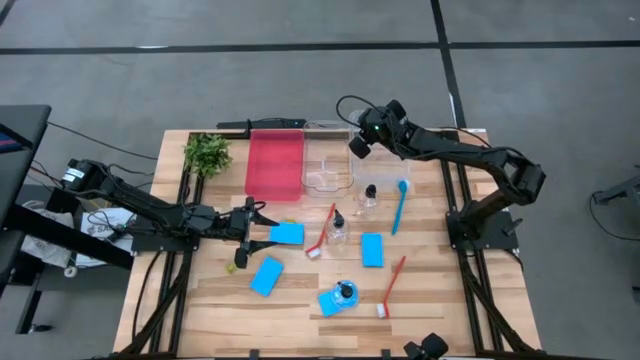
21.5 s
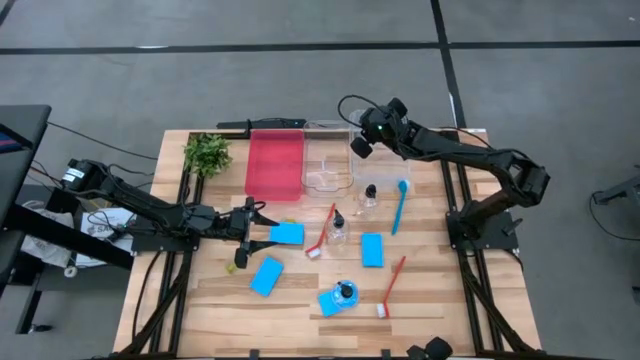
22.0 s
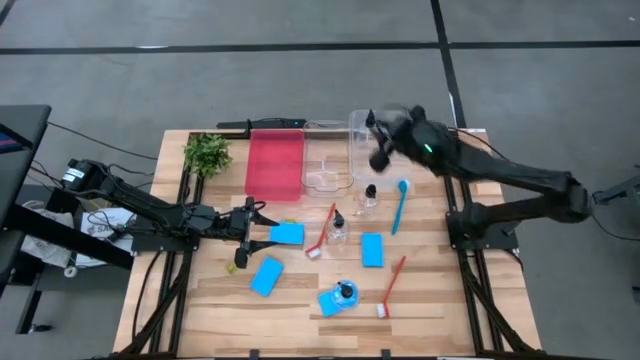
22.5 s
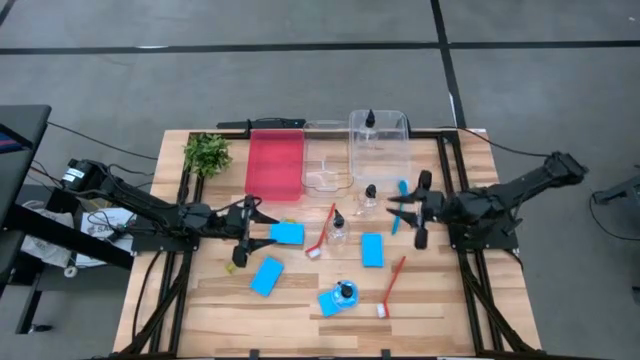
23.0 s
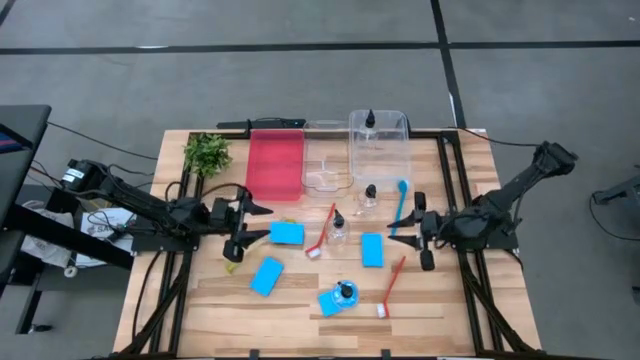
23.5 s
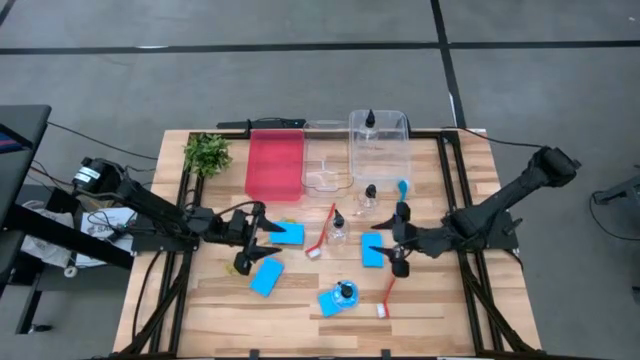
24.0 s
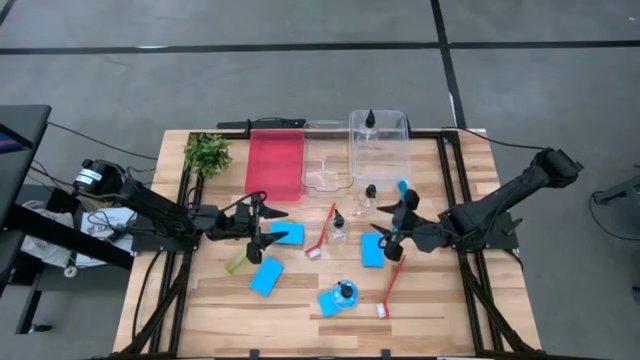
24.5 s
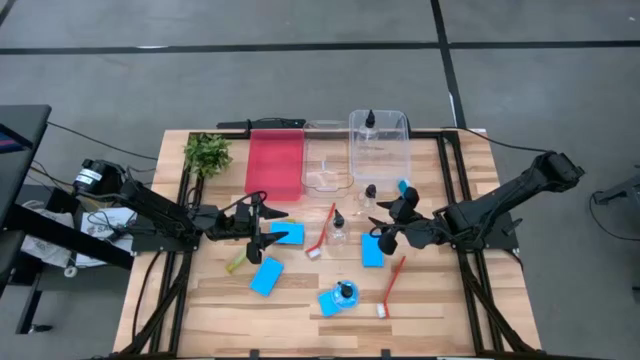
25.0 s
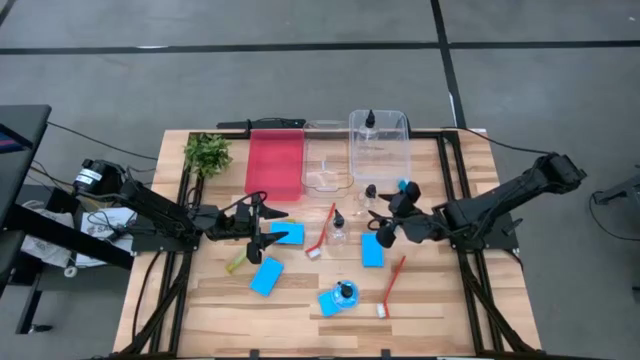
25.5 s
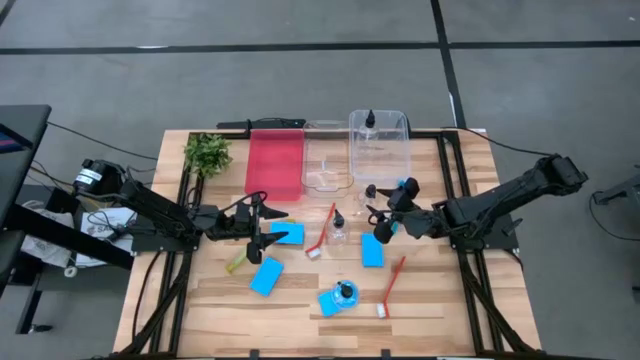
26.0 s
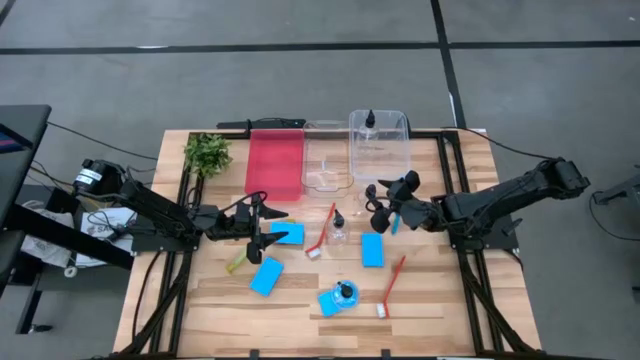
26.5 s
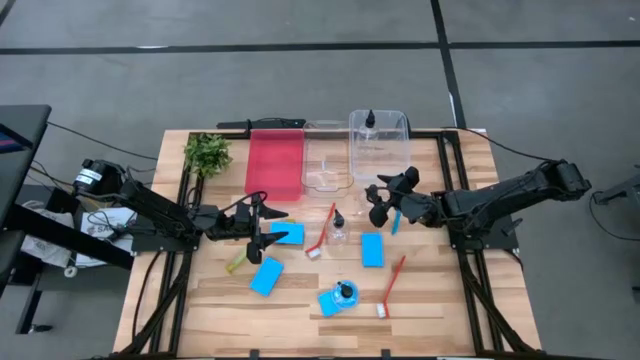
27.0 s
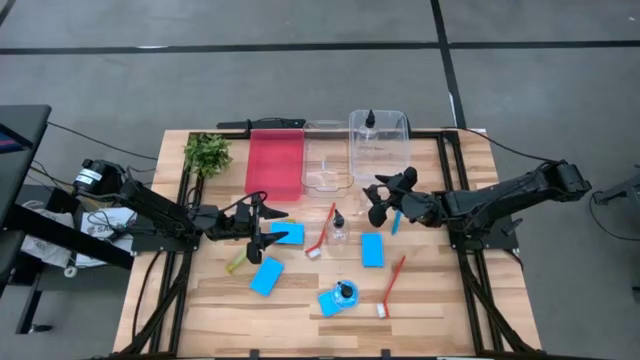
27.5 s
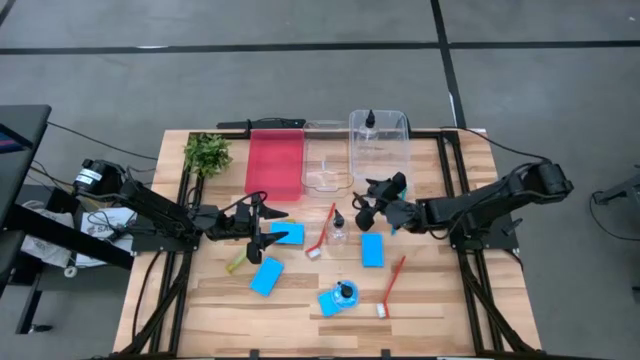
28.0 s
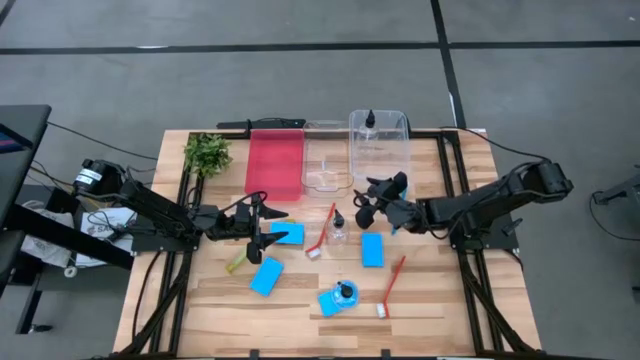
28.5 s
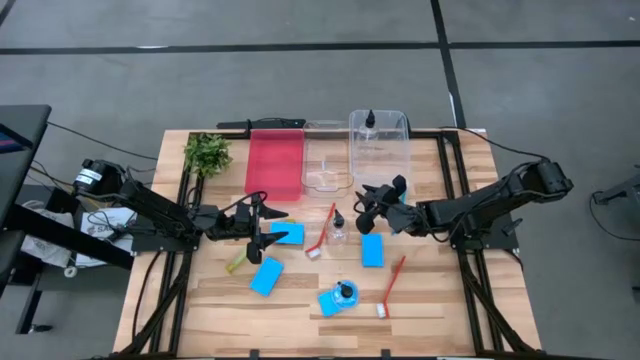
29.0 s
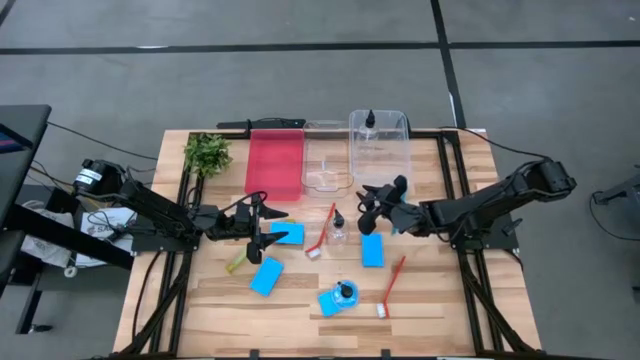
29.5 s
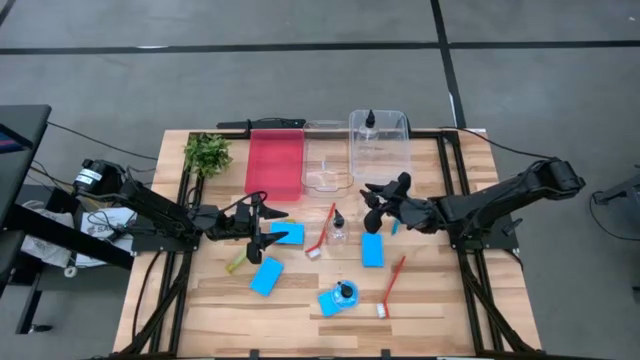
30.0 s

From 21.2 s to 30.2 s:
Task: Pick & Place Kitchen Sink Supplies
Put the top soap dispenser into the right transparent bin

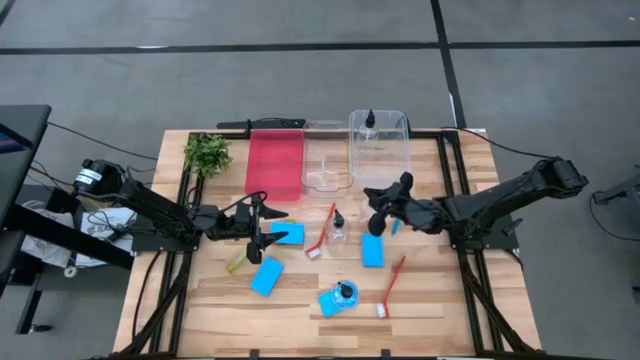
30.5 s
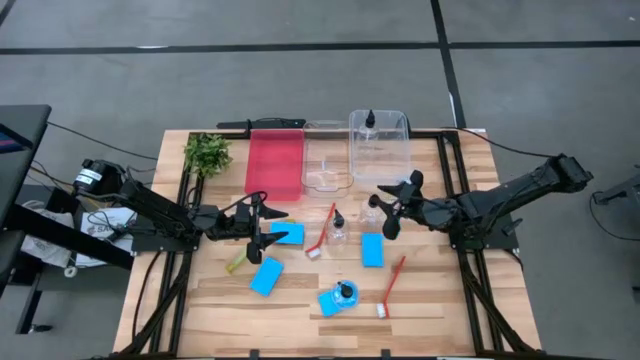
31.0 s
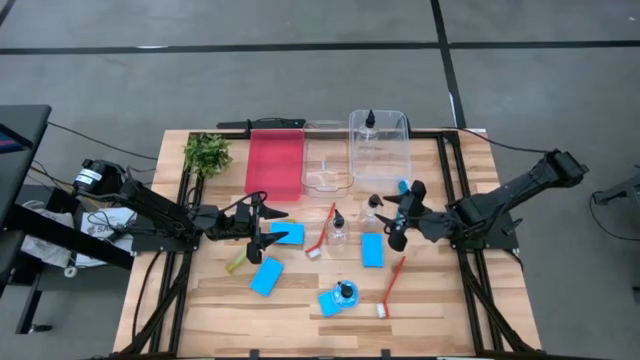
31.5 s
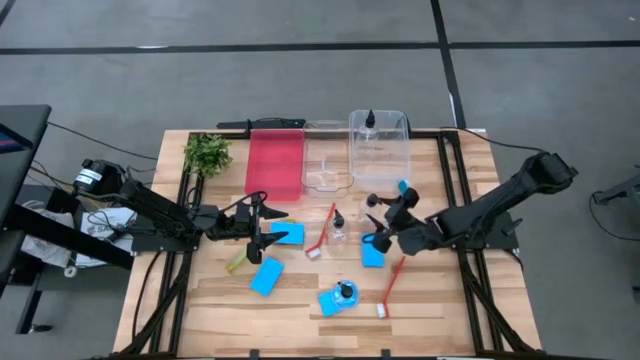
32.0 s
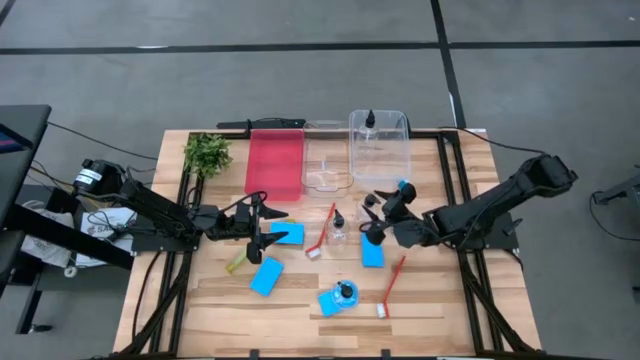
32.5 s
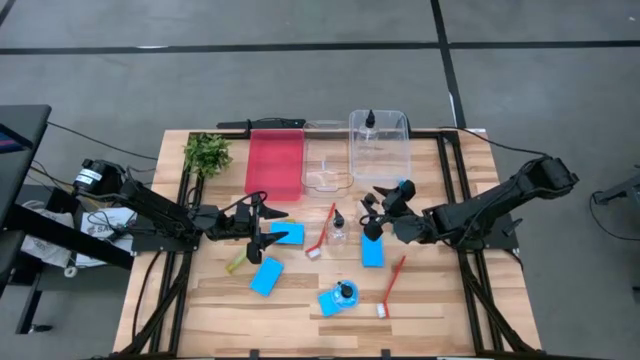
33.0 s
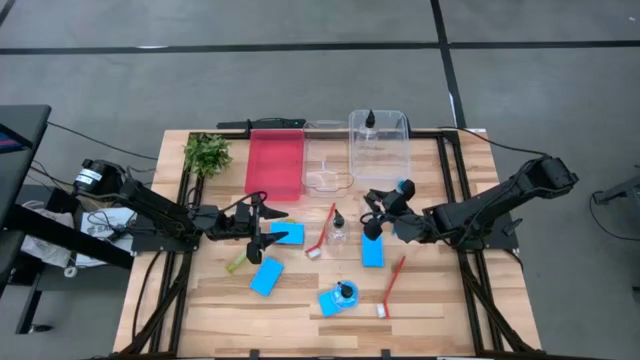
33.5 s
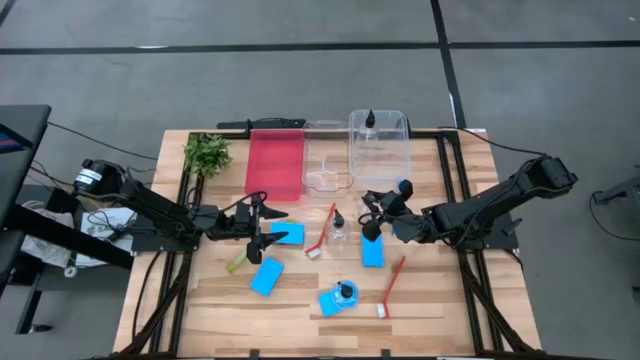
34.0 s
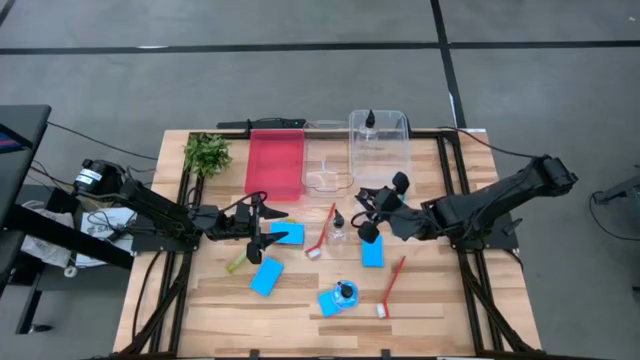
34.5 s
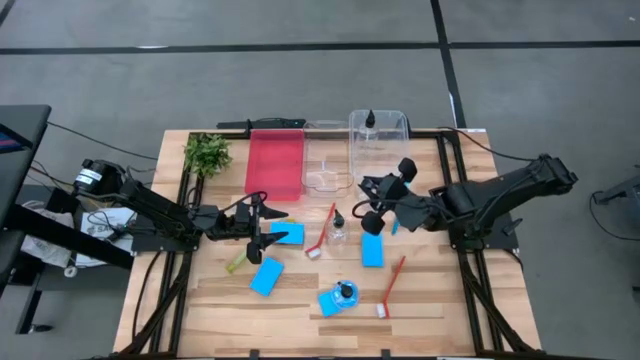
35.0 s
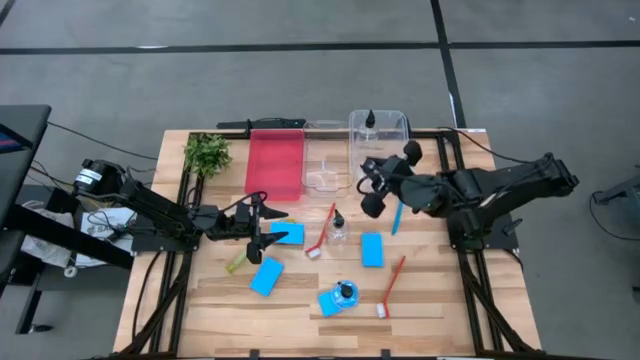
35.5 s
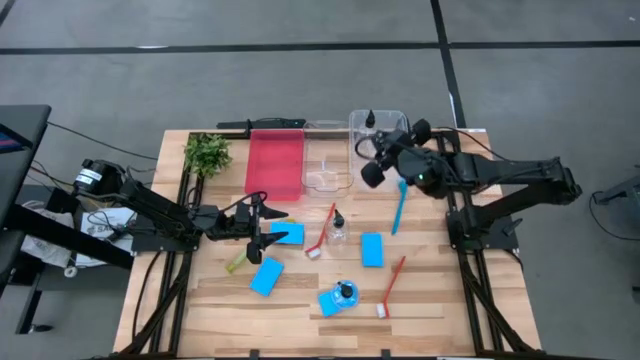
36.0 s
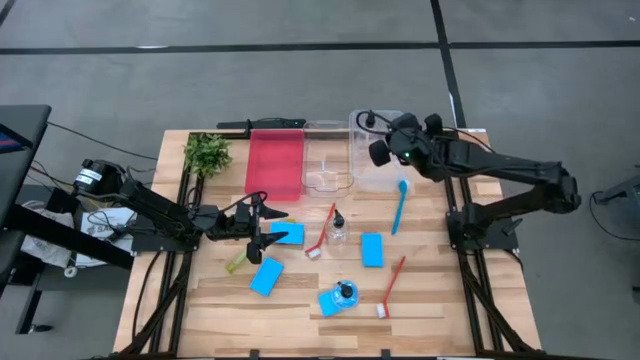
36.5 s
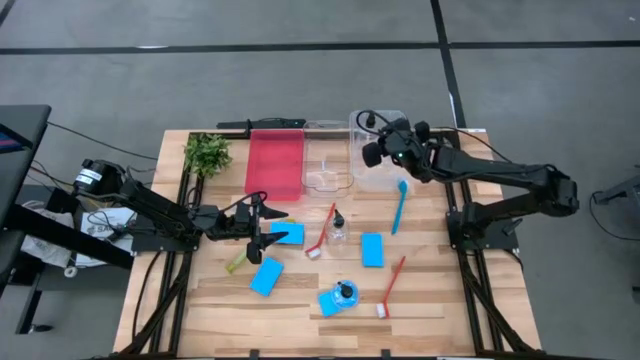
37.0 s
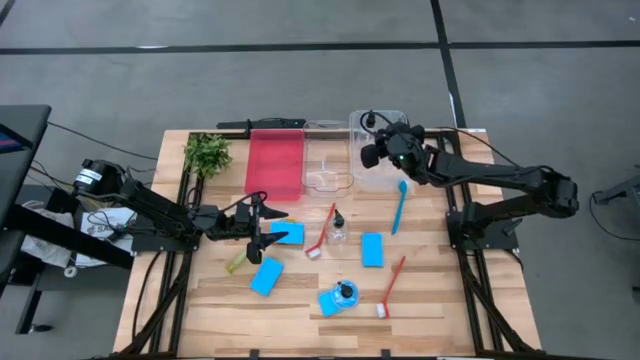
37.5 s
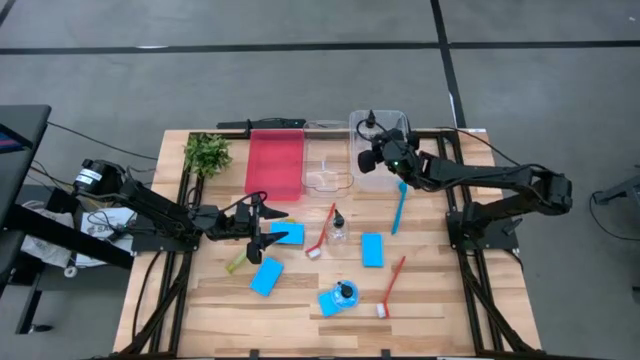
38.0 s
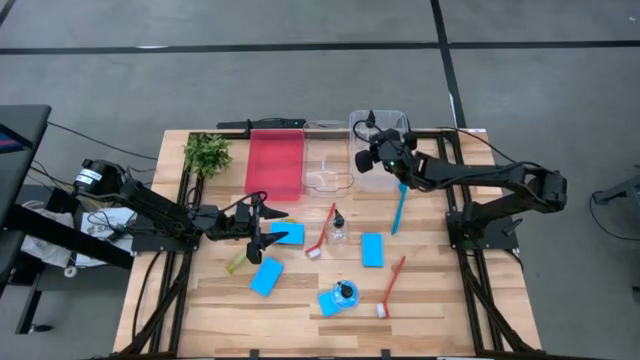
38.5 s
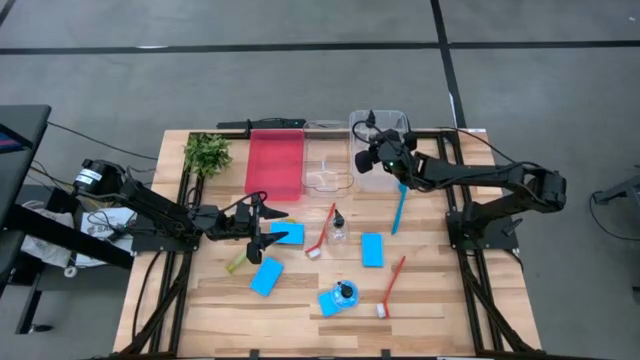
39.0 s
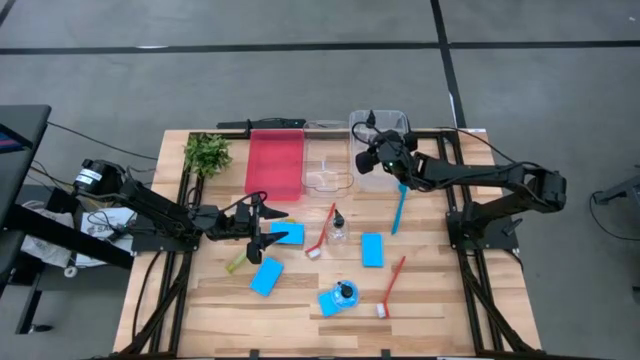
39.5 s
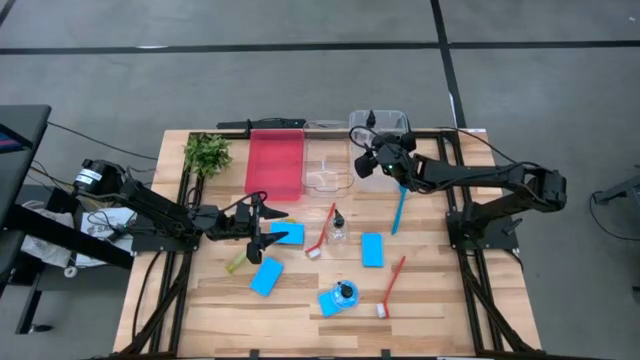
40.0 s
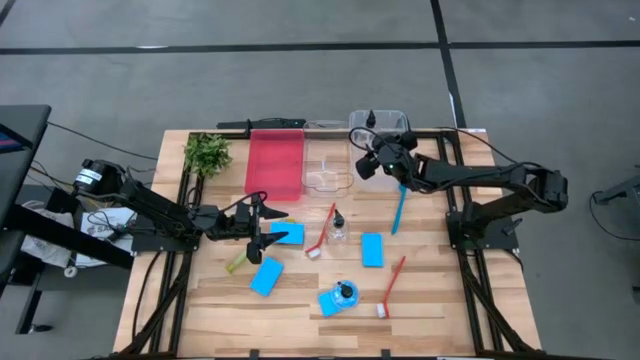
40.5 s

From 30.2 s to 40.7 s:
Put the top soap dispenser into the right transparent bin

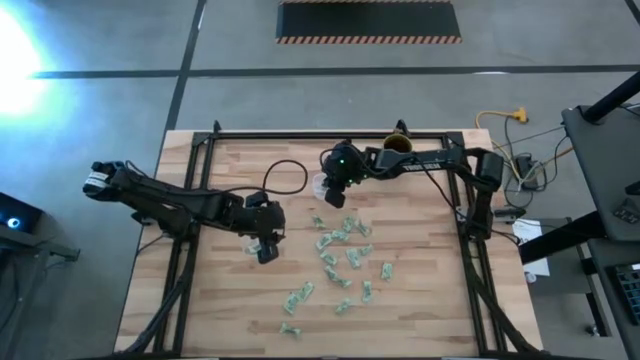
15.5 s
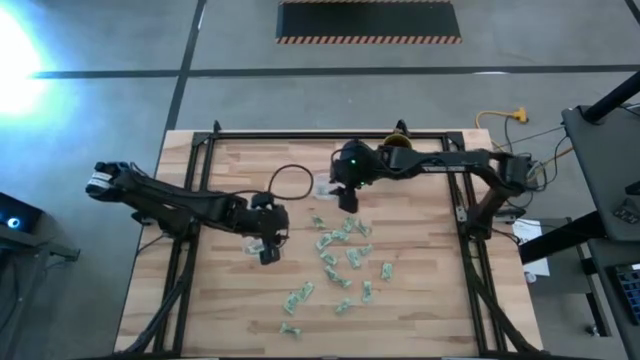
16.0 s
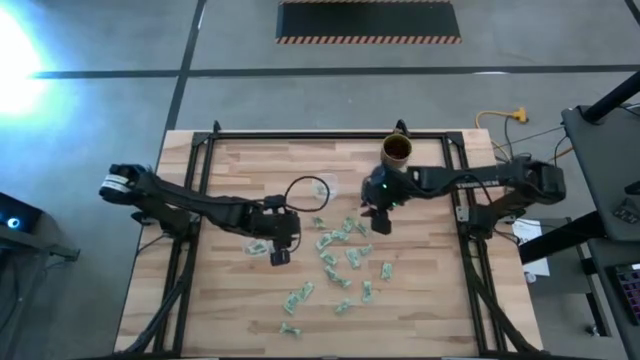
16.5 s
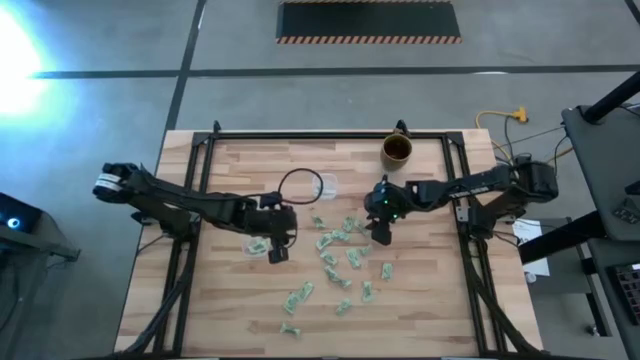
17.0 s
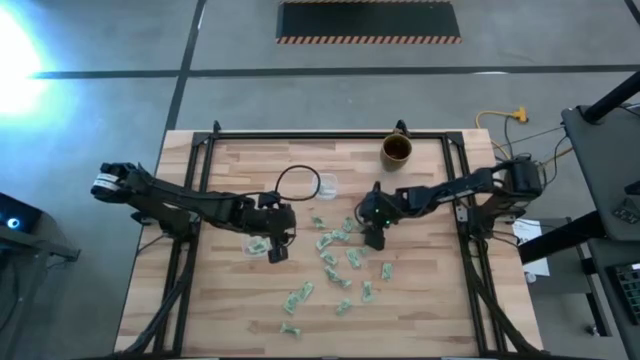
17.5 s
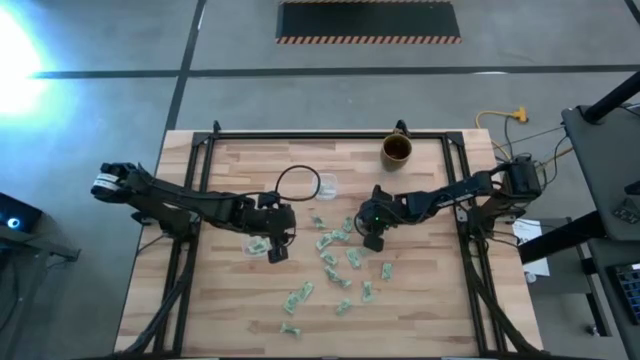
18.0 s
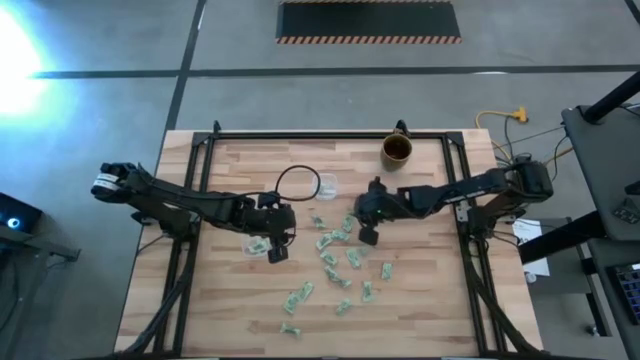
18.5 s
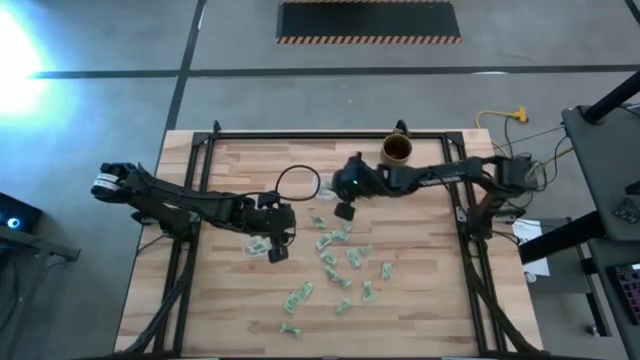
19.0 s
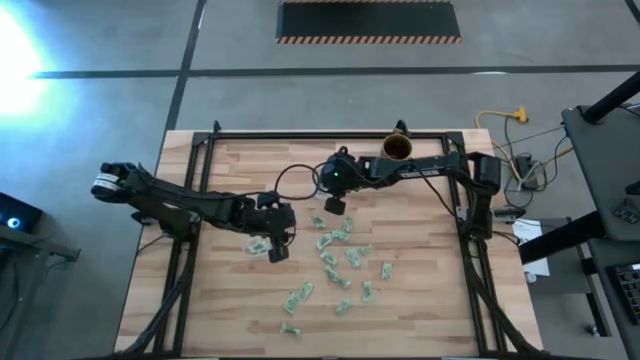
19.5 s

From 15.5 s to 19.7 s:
Task: Pick and place Stevia / Truvia into bins
Put the stevia packet into the top transparent container
